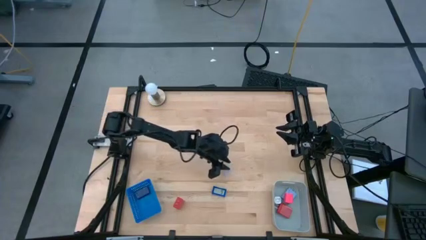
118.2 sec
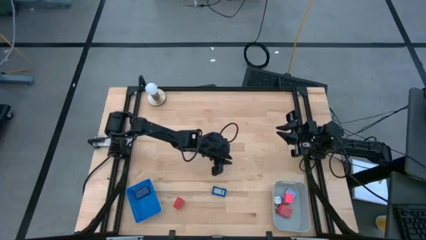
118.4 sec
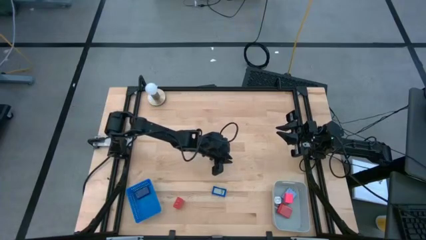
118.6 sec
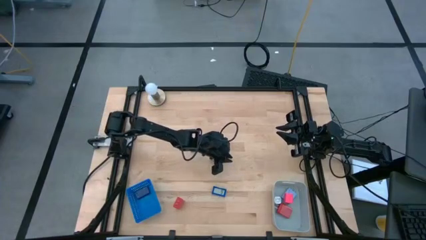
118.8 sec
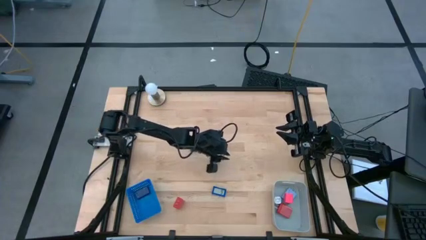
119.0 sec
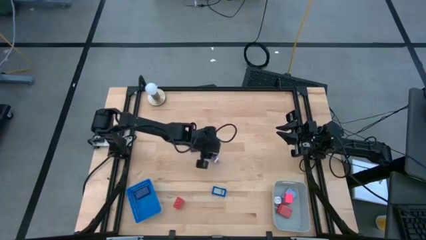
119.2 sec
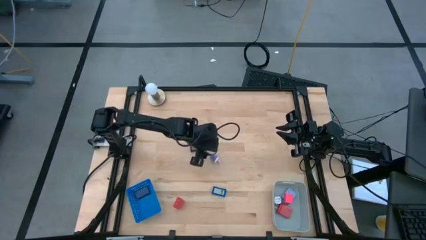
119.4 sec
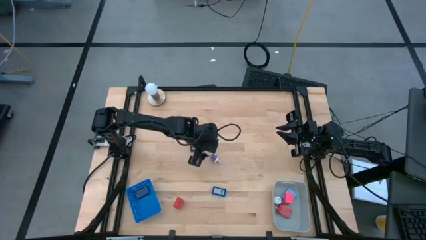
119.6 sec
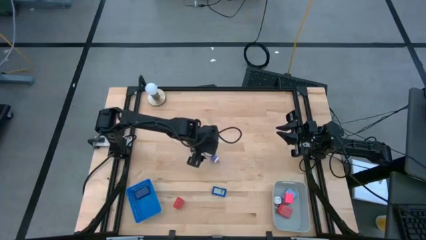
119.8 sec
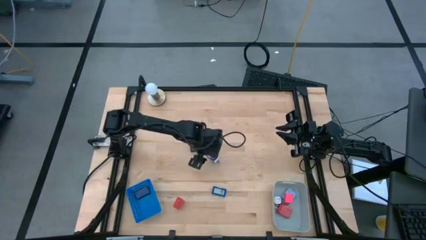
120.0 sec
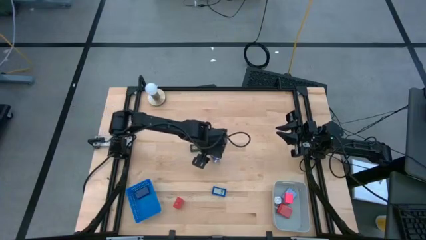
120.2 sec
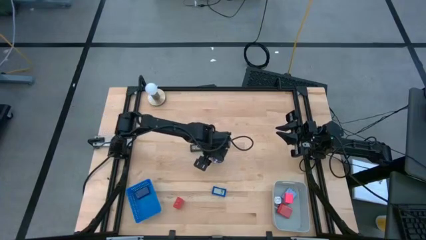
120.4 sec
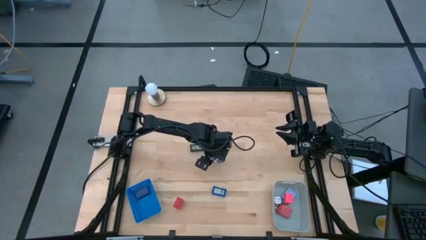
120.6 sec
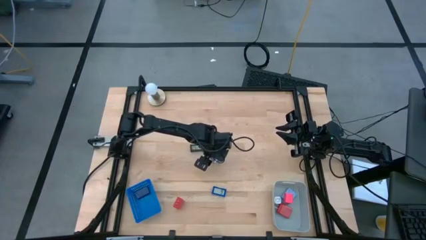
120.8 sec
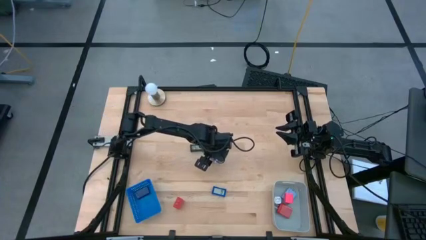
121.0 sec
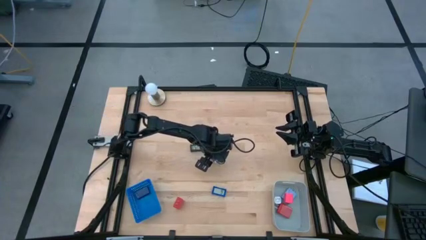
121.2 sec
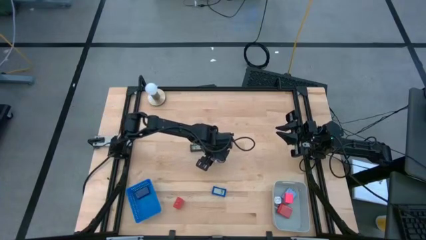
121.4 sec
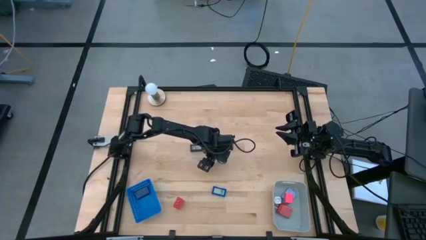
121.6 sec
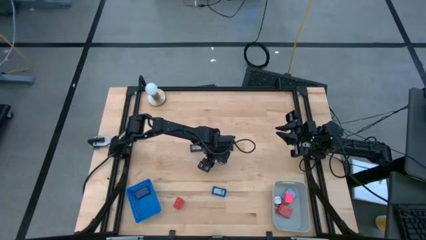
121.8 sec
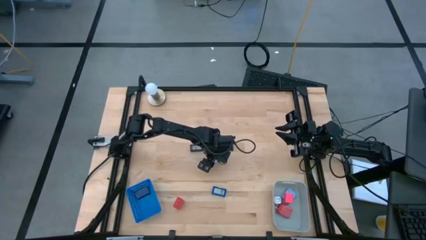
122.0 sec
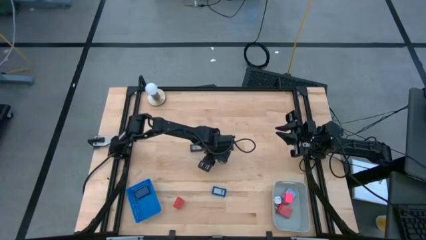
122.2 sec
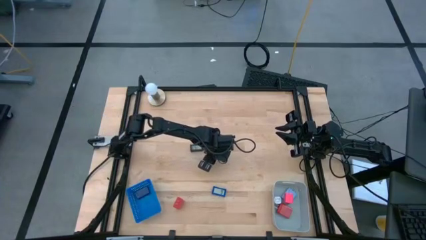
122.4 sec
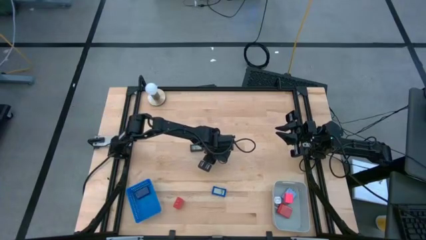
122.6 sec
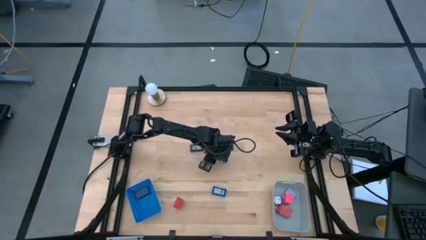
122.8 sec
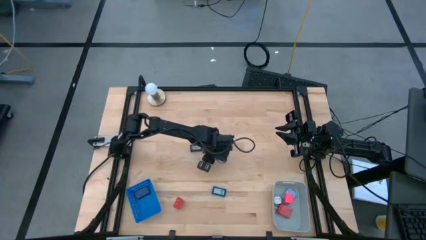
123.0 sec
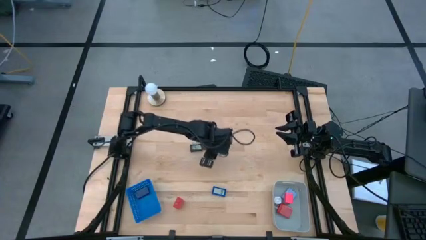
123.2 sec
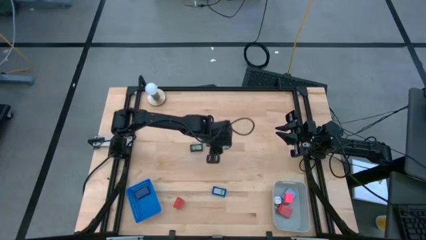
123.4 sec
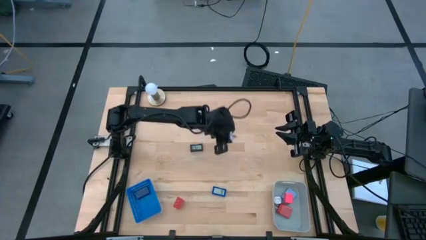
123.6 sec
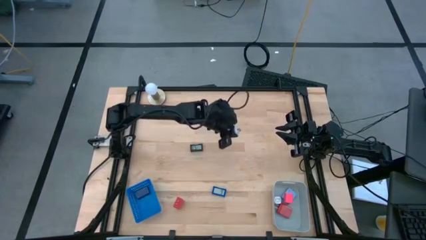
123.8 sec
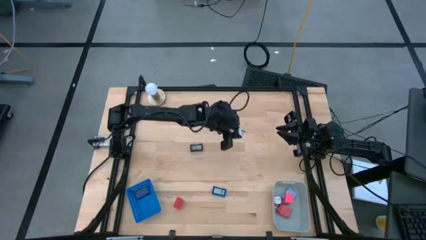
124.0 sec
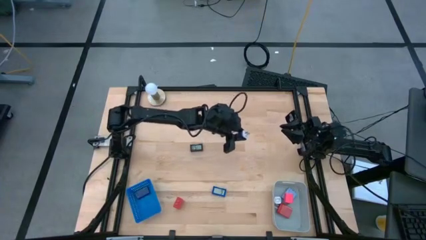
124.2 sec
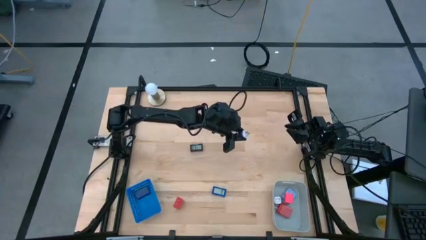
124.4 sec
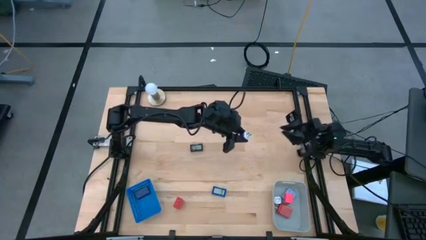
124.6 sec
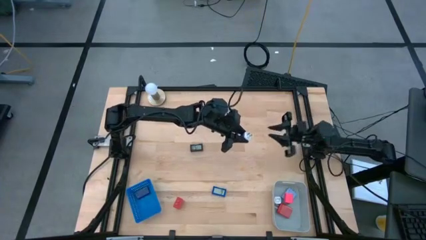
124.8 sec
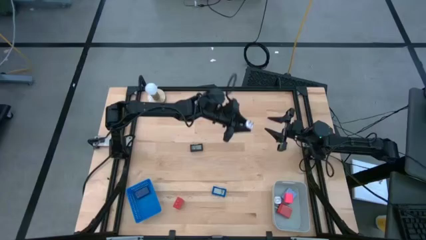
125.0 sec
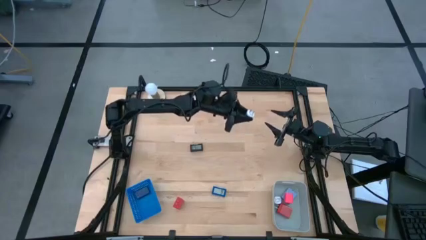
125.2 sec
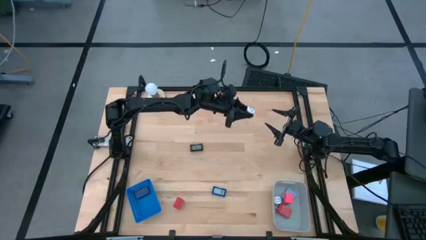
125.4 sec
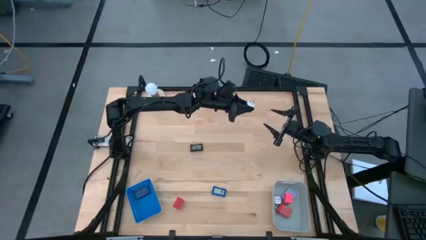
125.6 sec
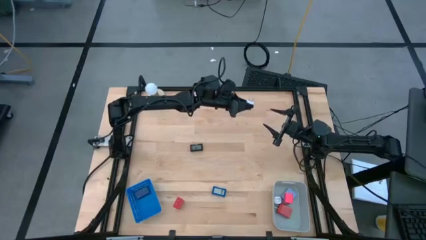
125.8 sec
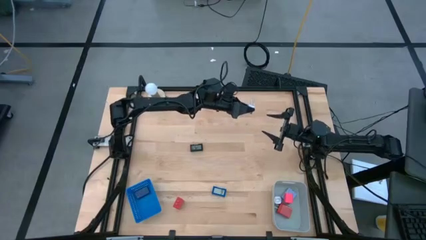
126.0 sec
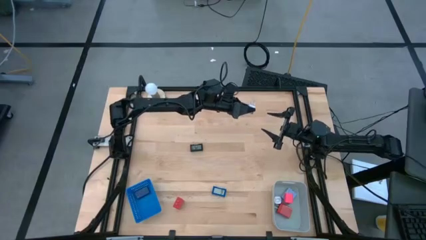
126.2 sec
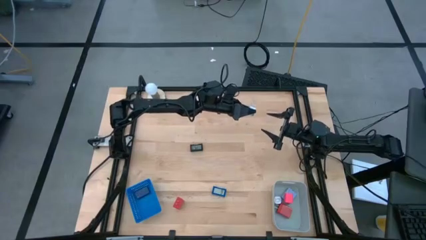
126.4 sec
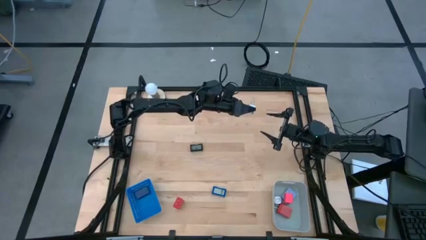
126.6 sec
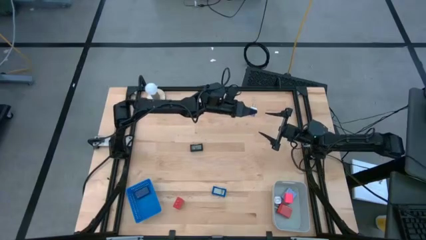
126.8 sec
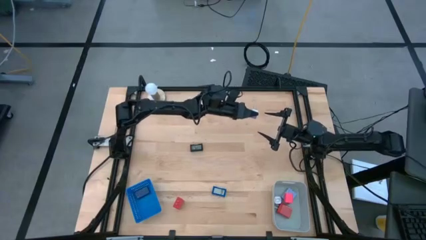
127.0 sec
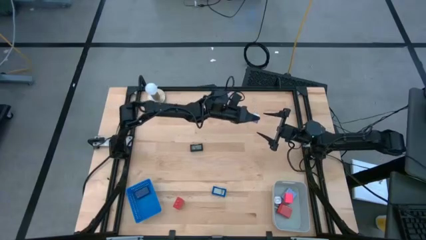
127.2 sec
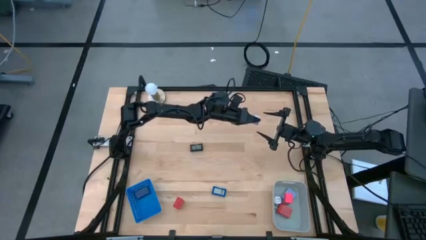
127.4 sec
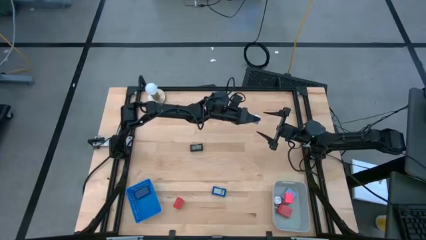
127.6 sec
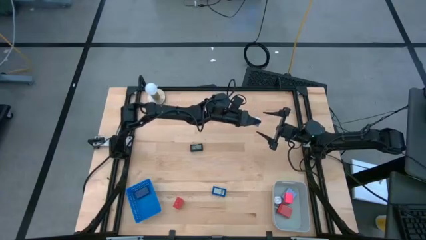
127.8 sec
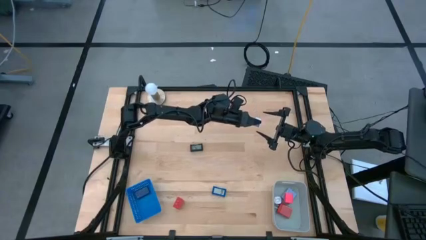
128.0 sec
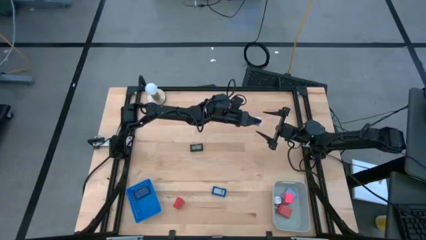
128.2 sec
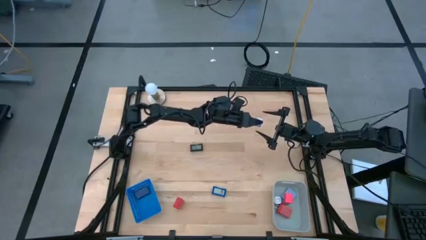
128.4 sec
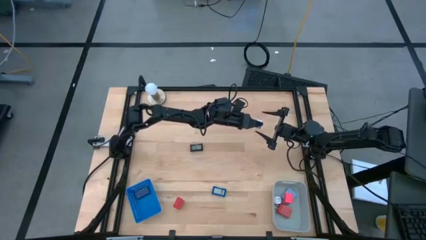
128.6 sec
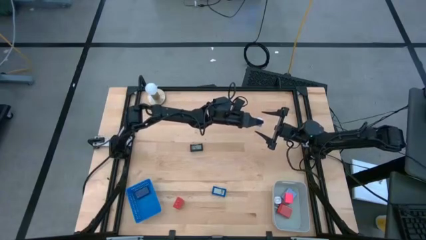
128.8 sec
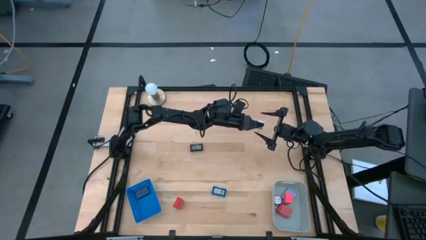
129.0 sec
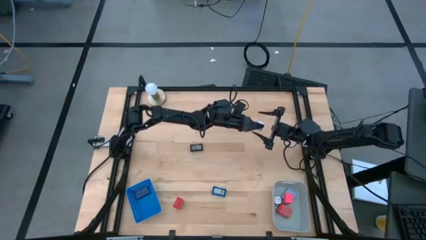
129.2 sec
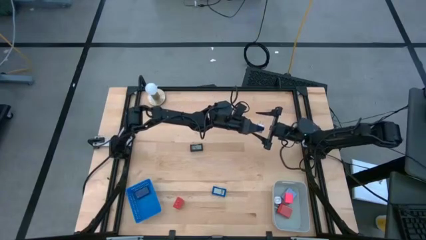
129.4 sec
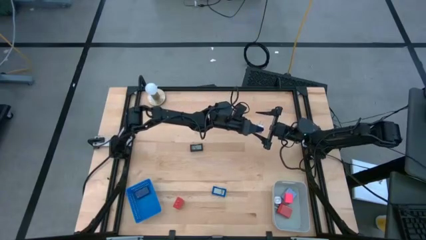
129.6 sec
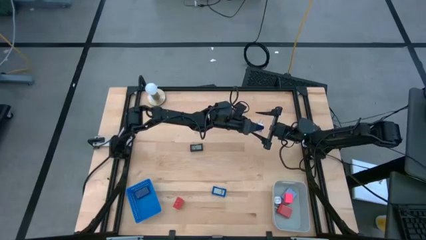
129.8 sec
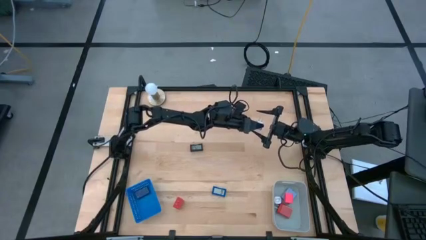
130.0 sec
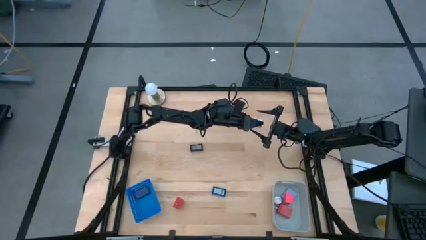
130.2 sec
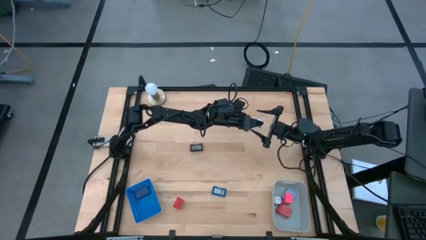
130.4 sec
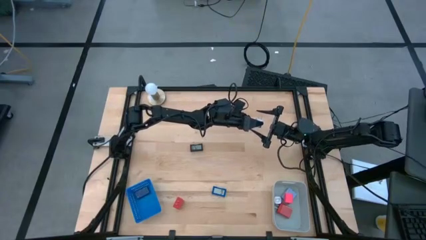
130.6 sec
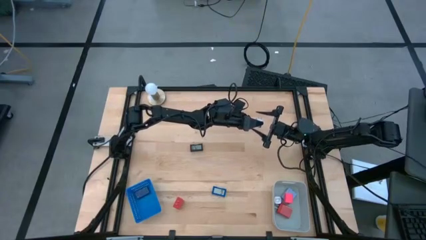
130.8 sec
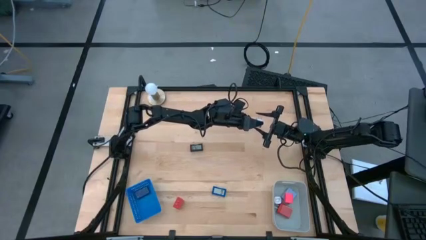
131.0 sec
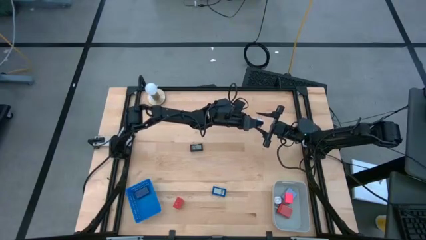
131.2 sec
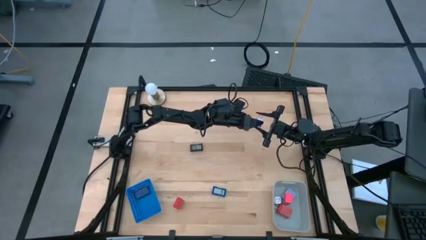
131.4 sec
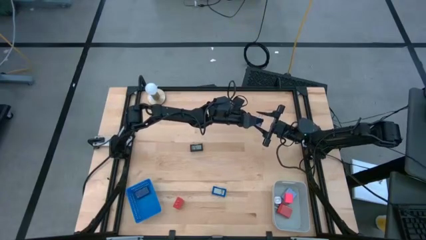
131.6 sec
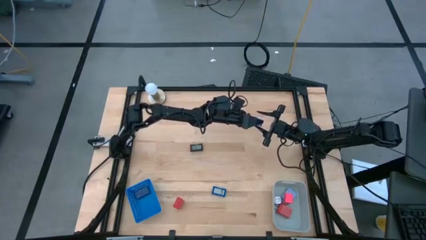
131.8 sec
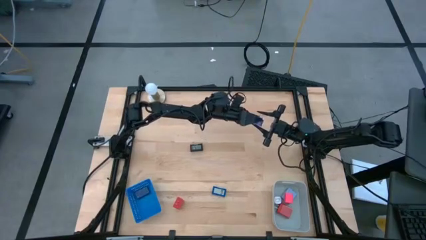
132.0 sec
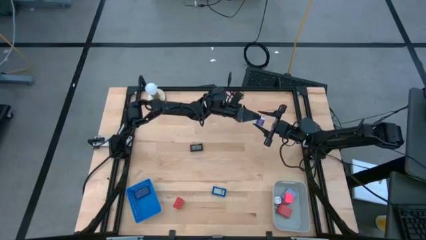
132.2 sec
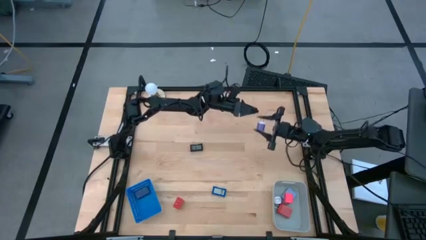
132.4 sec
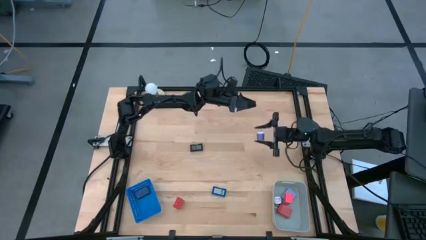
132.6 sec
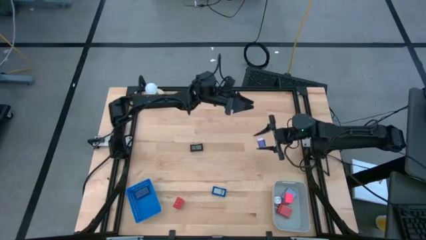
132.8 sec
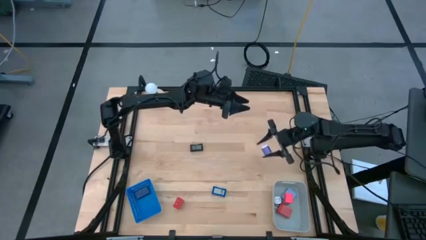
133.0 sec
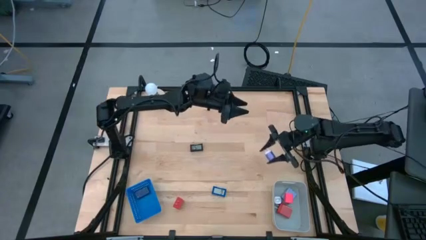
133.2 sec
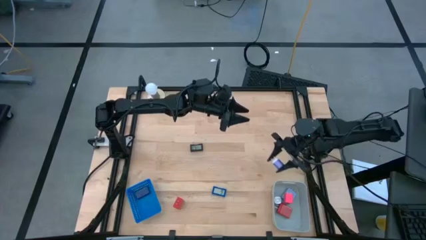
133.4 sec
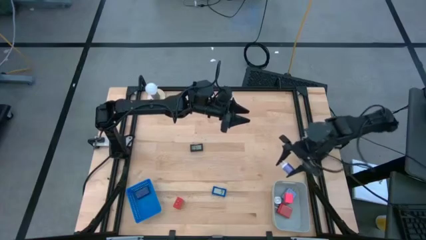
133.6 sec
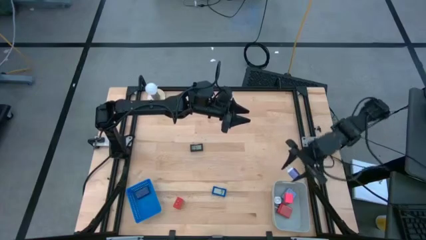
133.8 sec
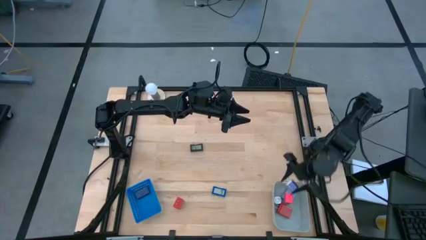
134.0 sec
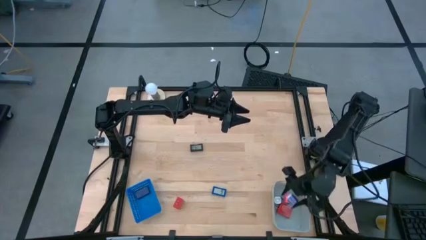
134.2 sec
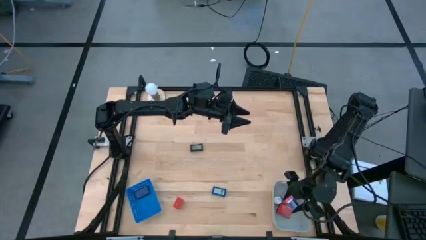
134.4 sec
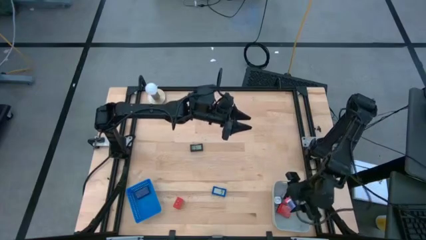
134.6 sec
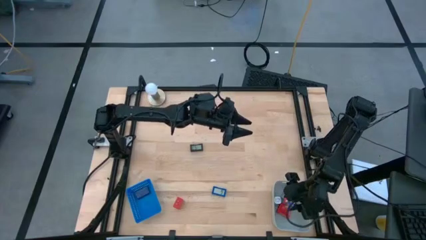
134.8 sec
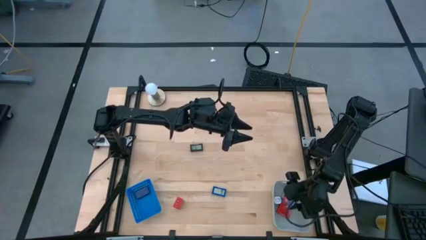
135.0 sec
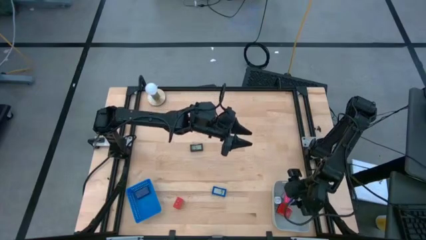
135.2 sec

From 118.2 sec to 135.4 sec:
Task: Pick & Place Office items
Put the purple charger adapter into the gray bin
